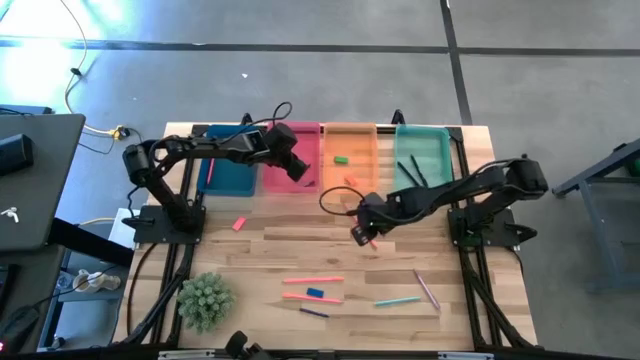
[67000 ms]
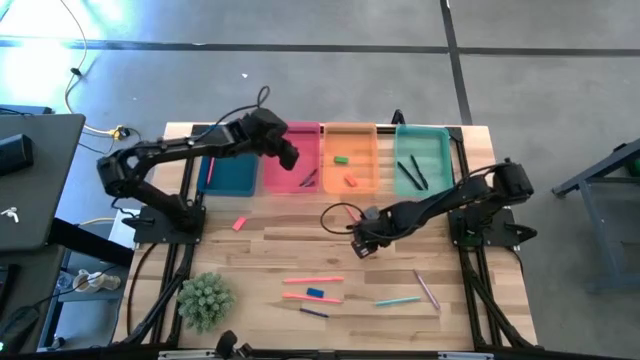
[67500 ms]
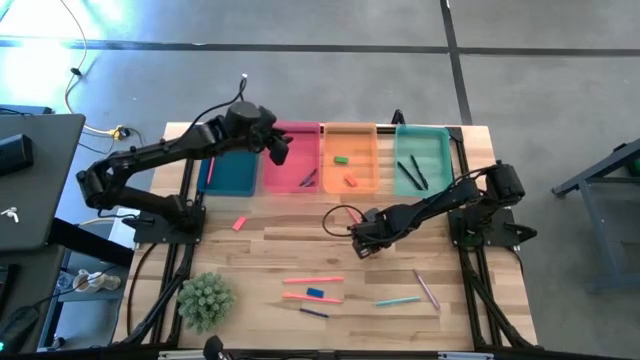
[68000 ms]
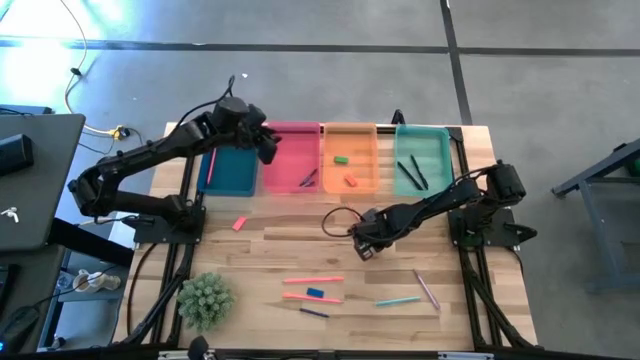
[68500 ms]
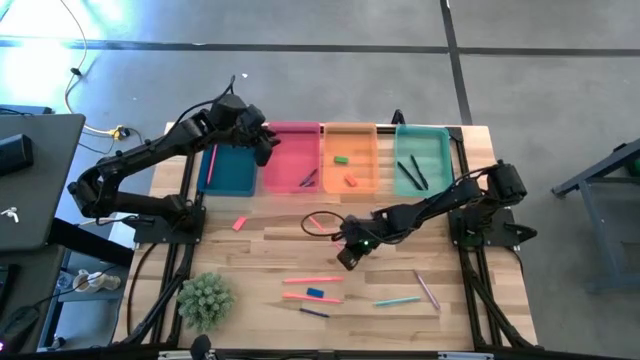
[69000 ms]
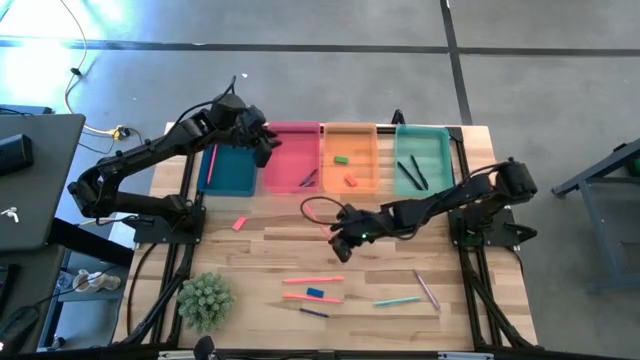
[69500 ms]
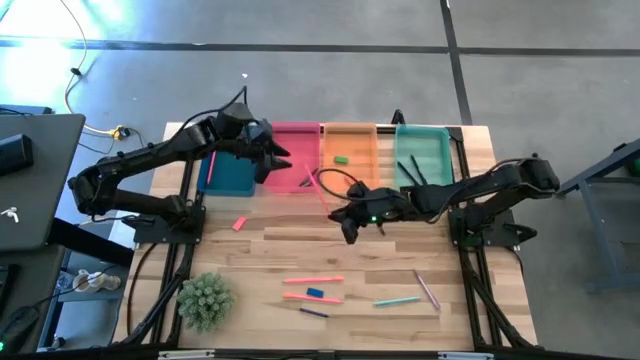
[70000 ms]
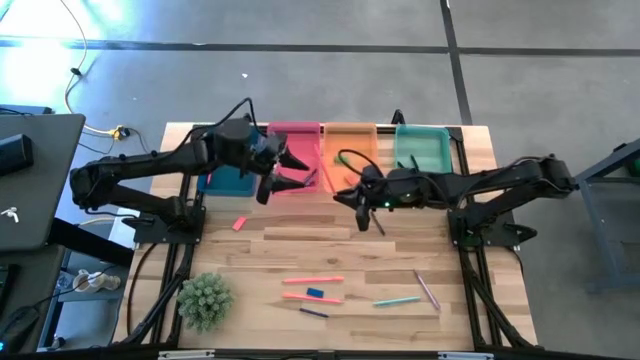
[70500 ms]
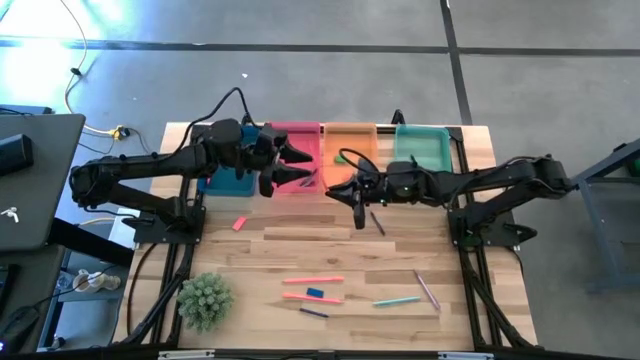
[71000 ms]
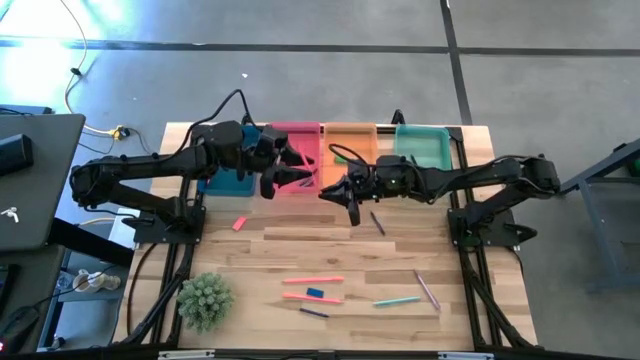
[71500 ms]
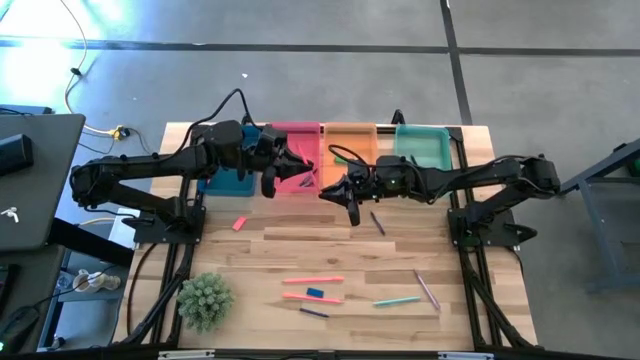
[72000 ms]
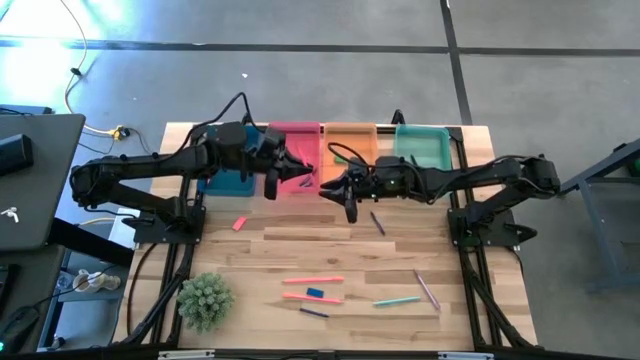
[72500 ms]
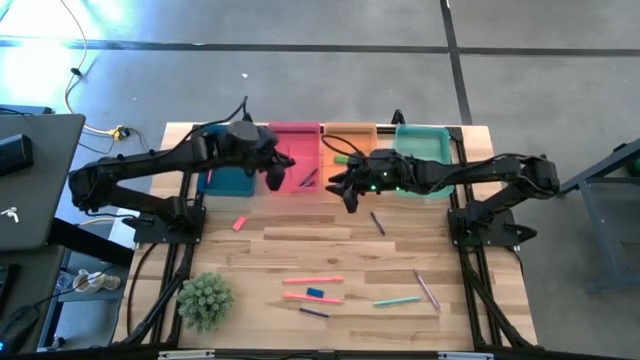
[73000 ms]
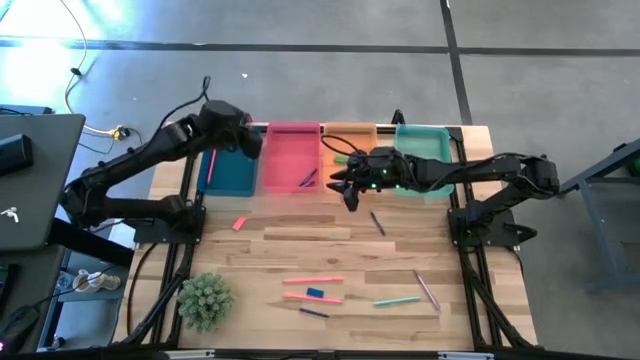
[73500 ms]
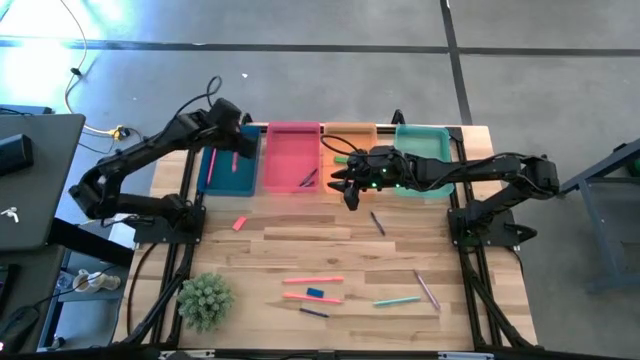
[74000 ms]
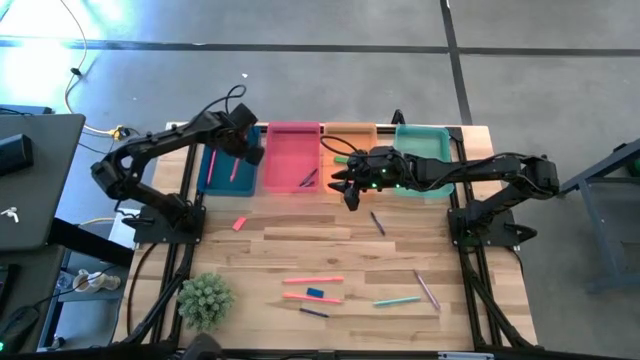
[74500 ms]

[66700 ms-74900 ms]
Task: Sort crayons/erasers/pens/pencils in bins
Put the top pink pencil into the blue transparent bin

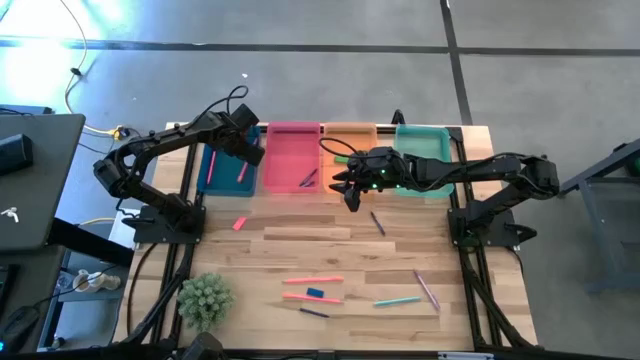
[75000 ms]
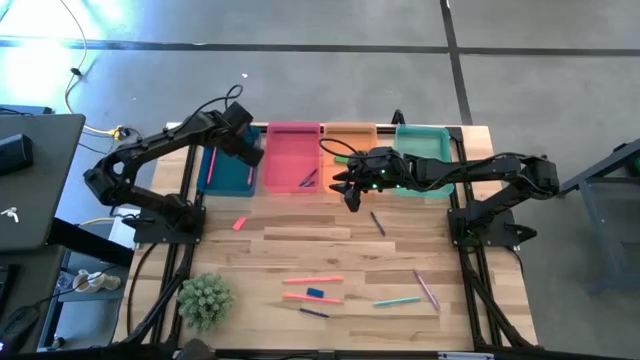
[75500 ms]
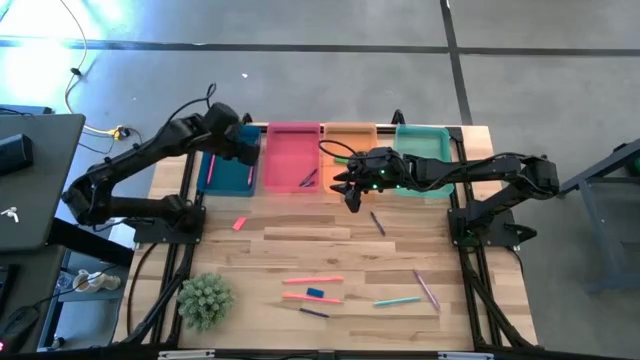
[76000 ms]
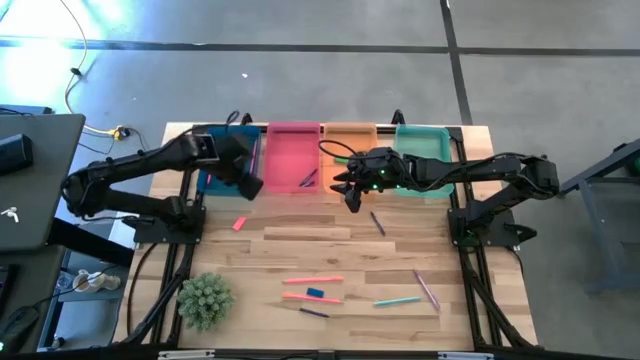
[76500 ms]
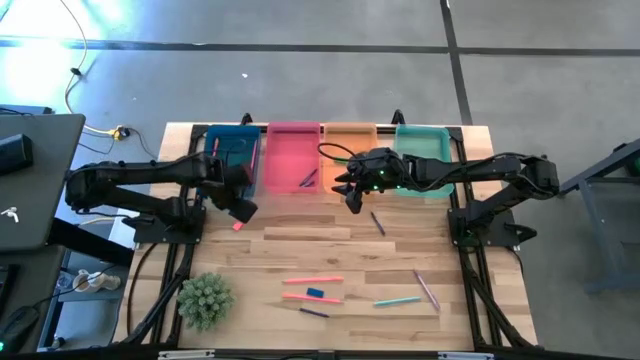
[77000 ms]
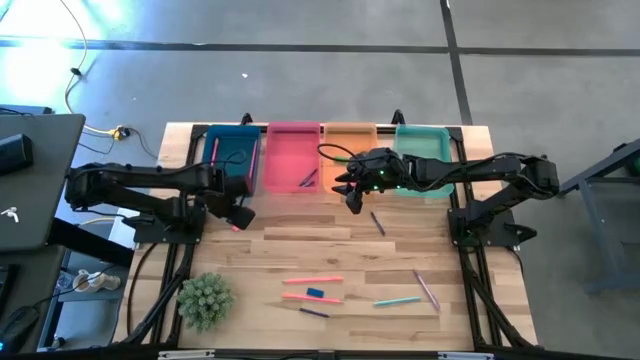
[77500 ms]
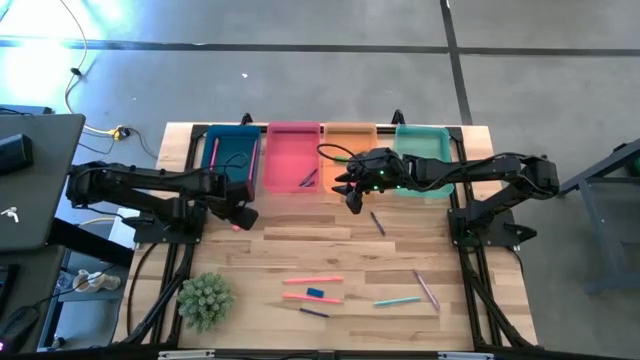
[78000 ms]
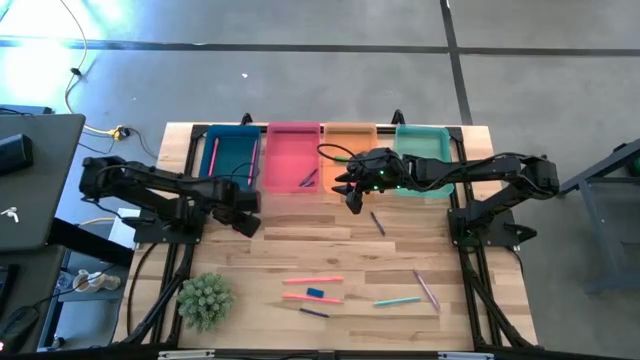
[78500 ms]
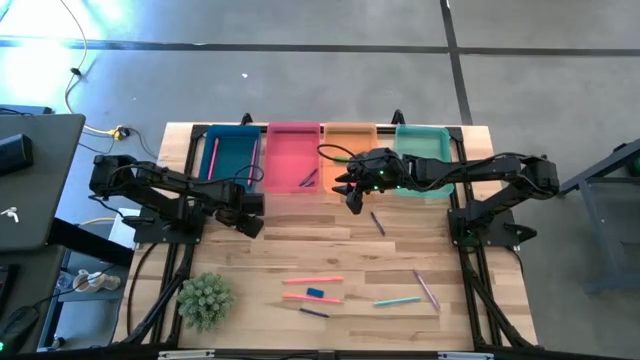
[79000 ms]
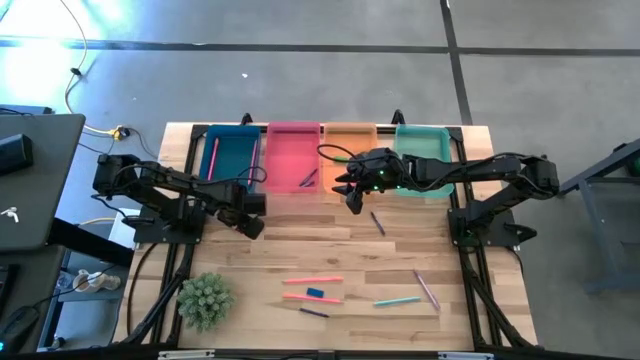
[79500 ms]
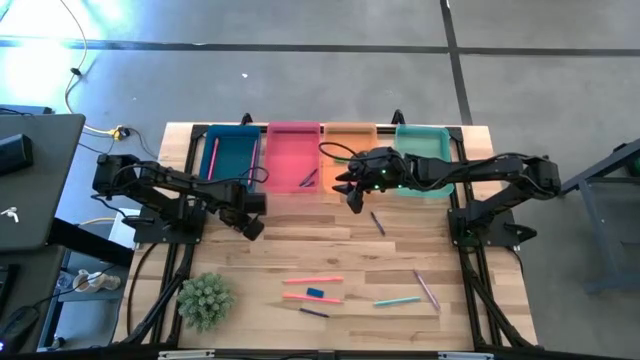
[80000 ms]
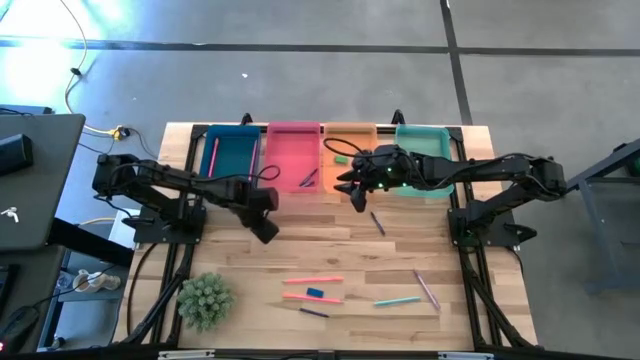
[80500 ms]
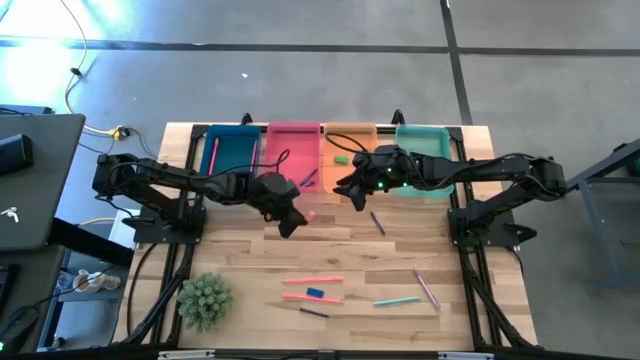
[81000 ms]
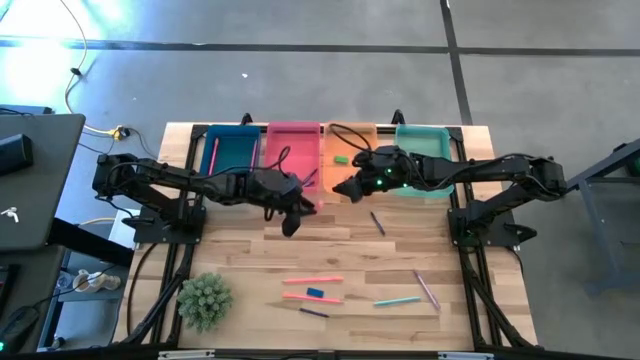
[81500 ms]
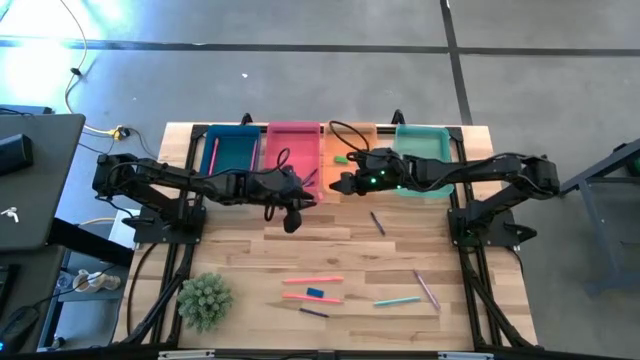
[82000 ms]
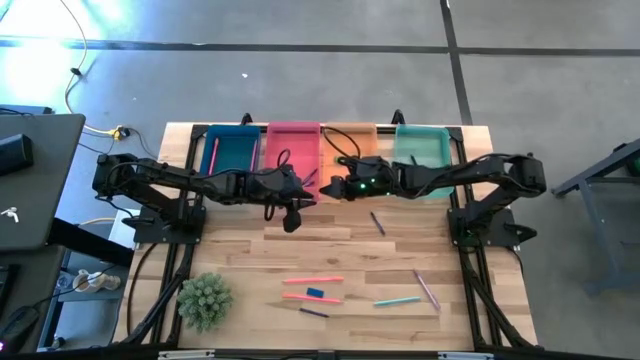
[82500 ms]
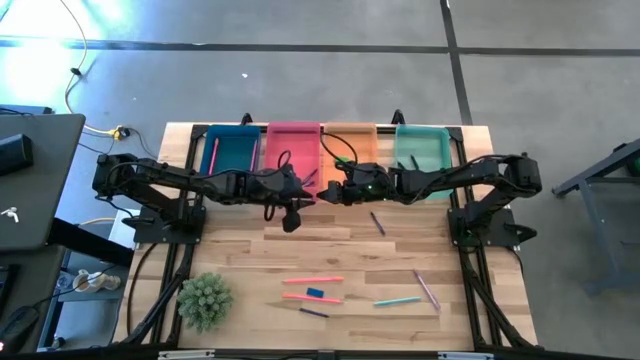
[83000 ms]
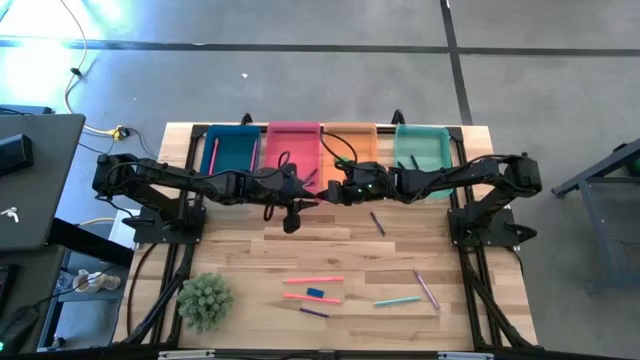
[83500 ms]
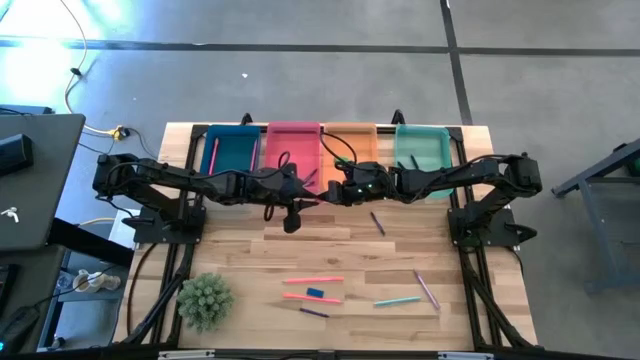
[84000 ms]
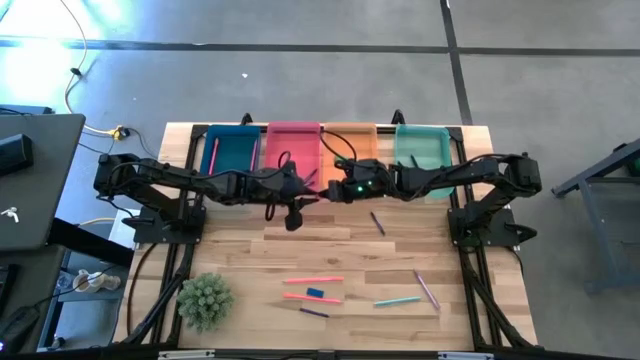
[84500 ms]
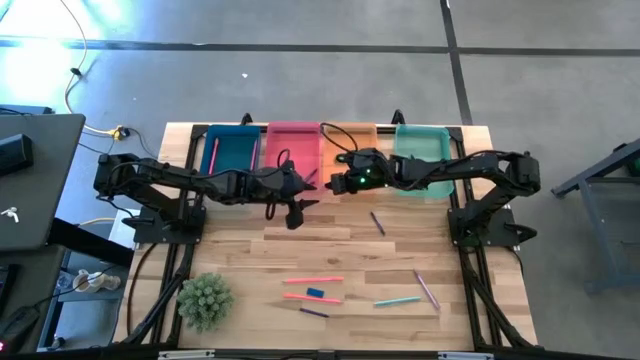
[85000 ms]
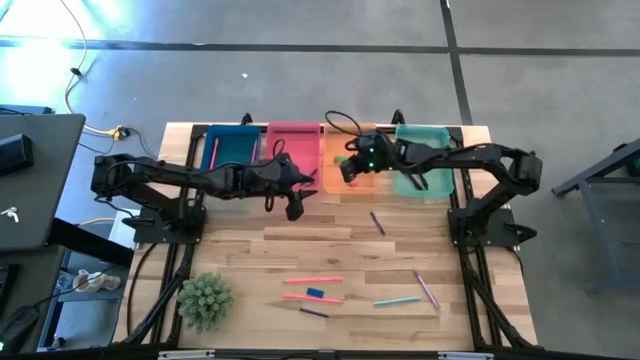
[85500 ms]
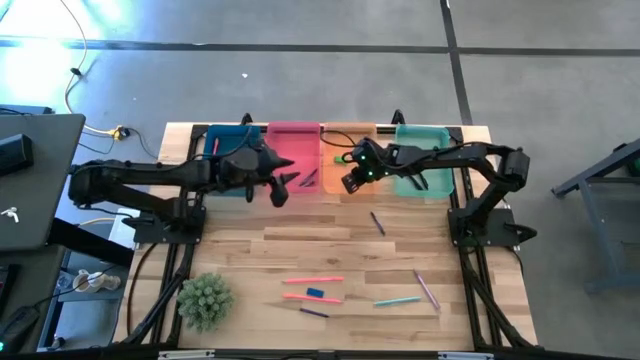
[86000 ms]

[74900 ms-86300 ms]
Put the pink eraser into the orange bin

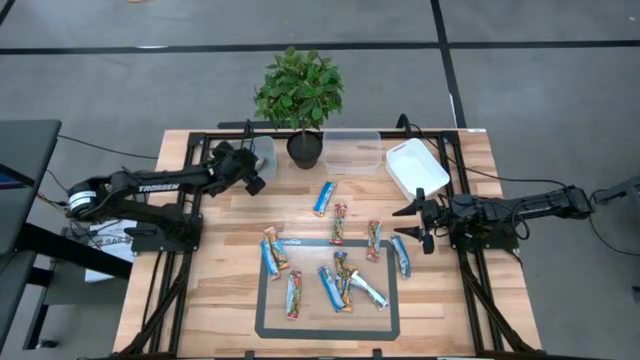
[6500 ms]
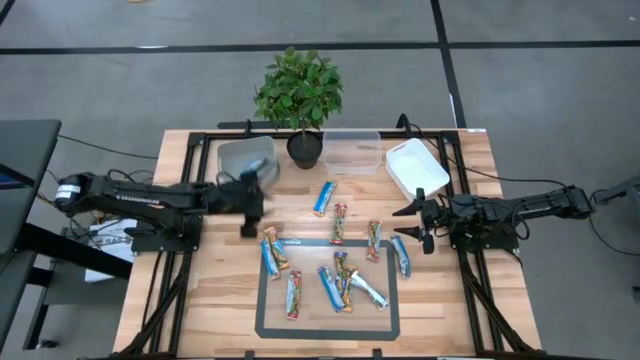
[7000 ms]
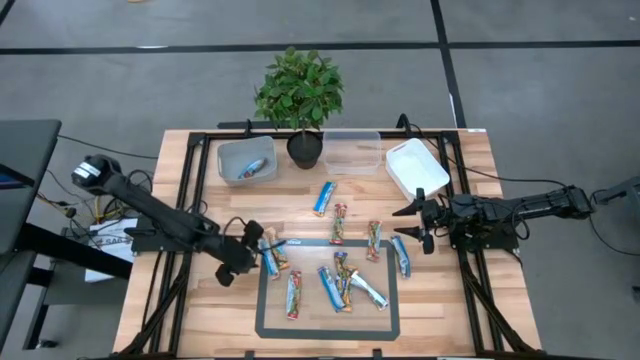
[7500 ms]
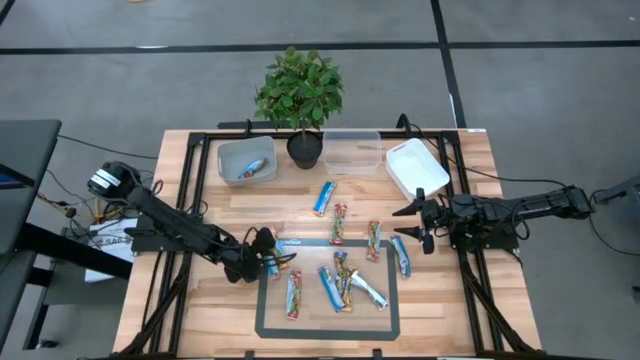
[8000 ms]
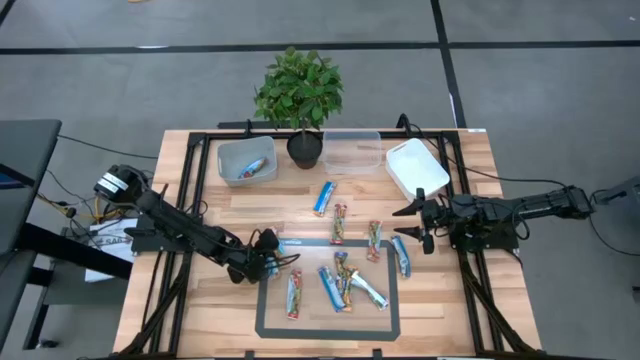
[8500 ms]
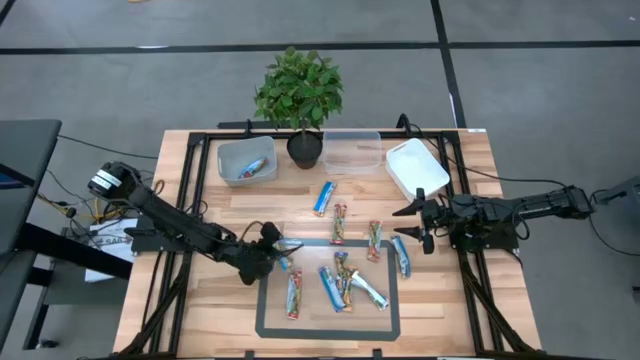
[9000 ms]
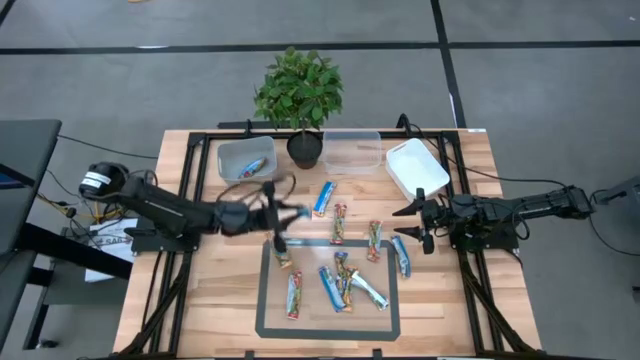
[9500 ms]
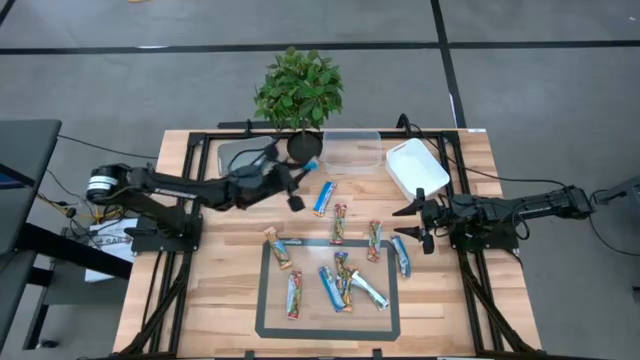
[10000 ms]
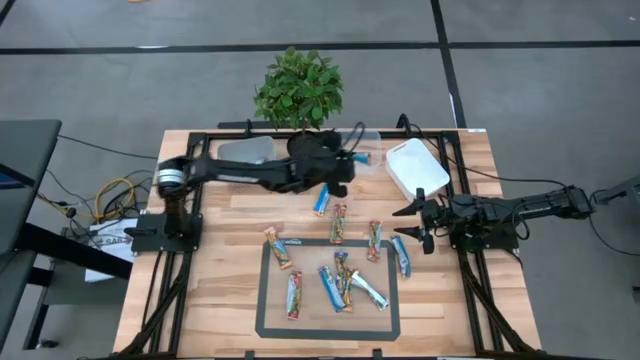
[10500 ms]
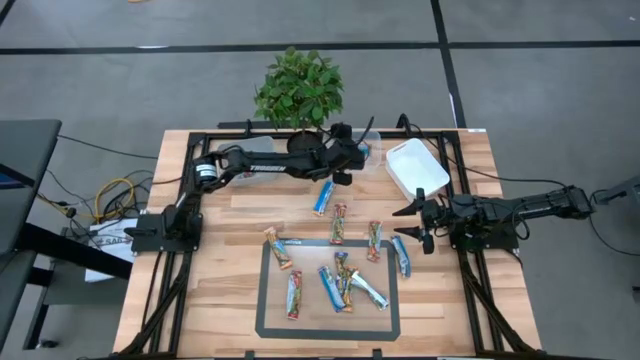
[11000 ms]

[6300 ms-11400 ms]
Task: Pick and place Granola Bars by type
Put the yellow granola bar into the transparent bin
